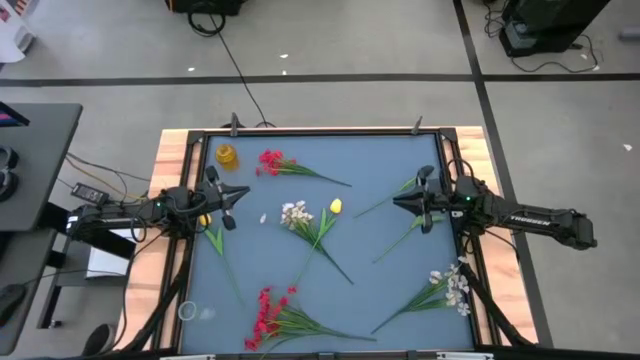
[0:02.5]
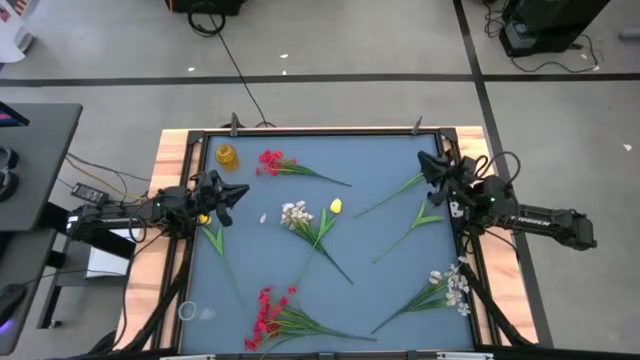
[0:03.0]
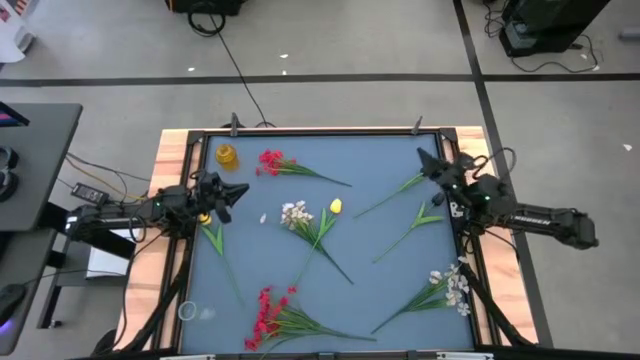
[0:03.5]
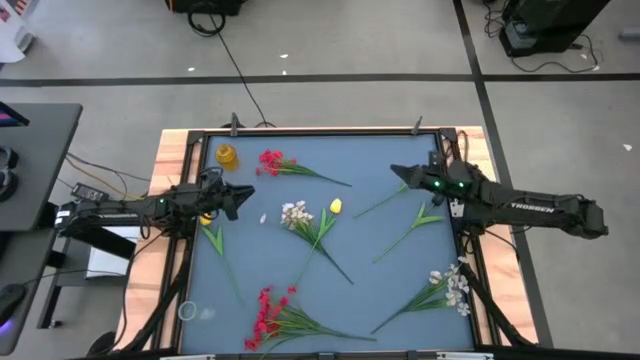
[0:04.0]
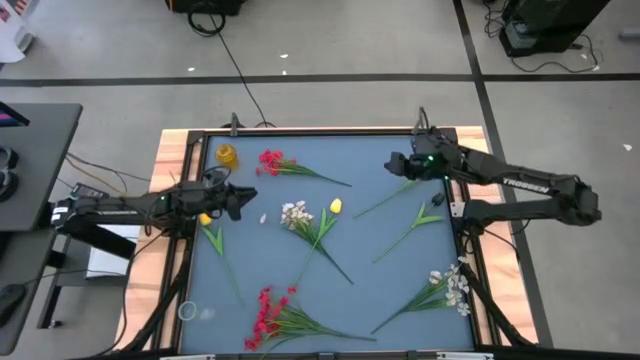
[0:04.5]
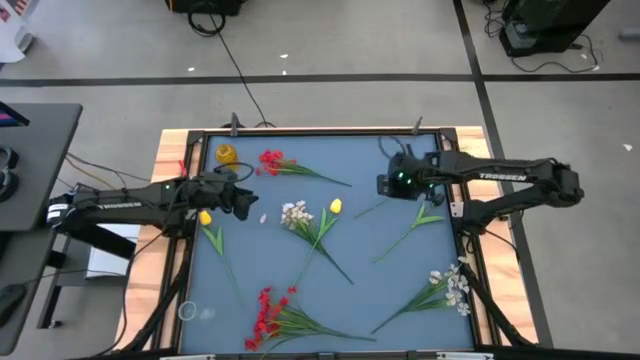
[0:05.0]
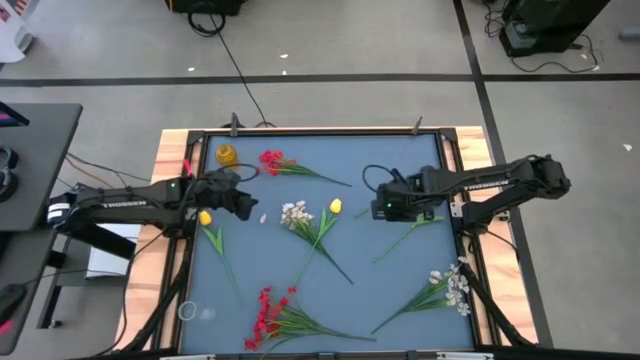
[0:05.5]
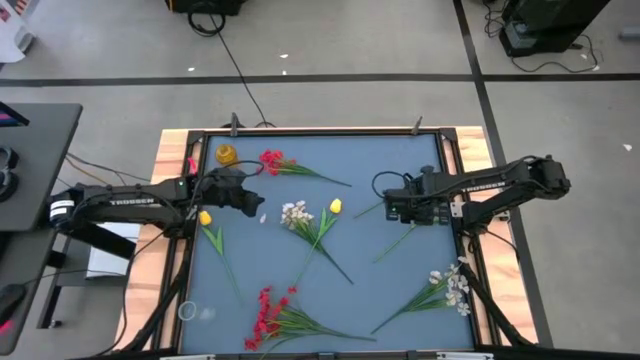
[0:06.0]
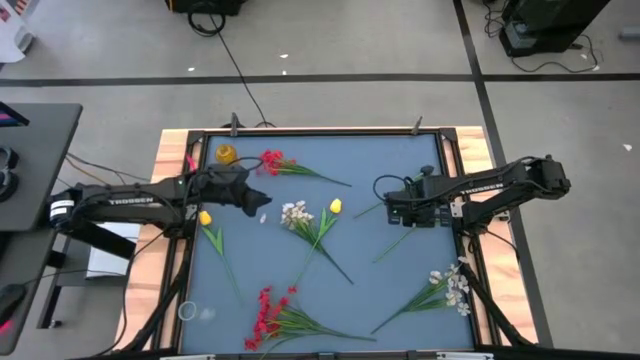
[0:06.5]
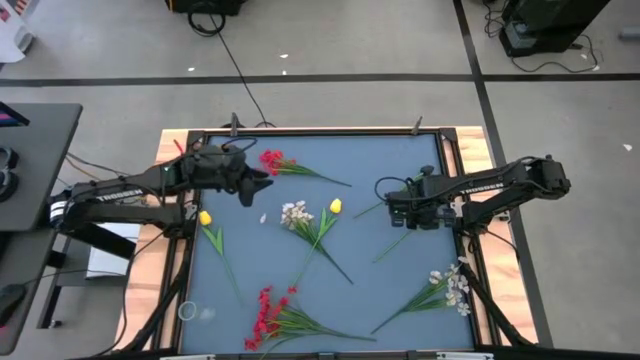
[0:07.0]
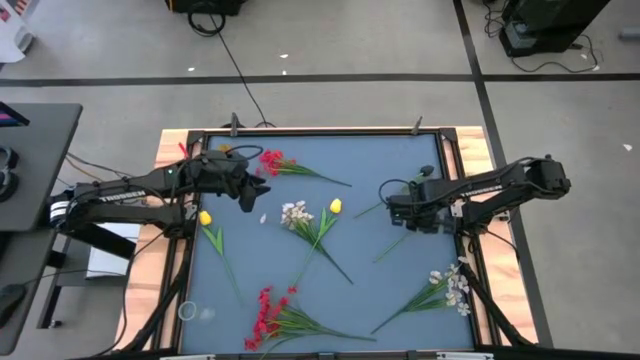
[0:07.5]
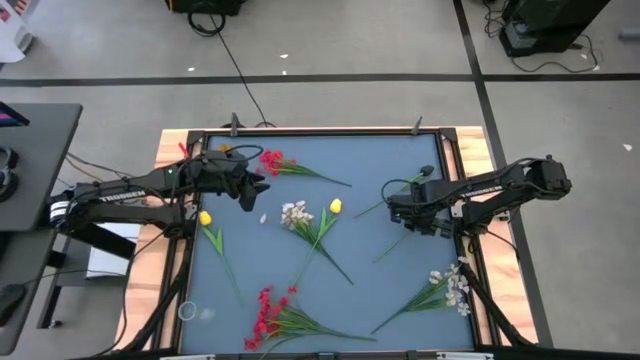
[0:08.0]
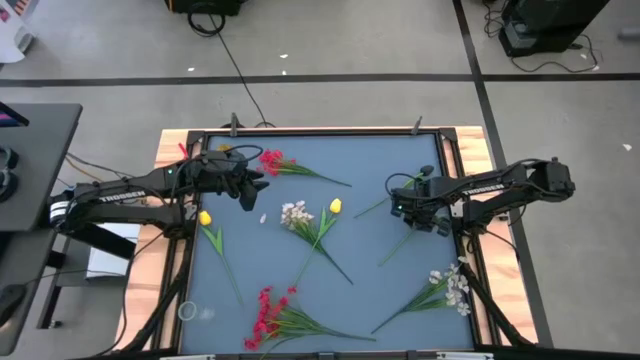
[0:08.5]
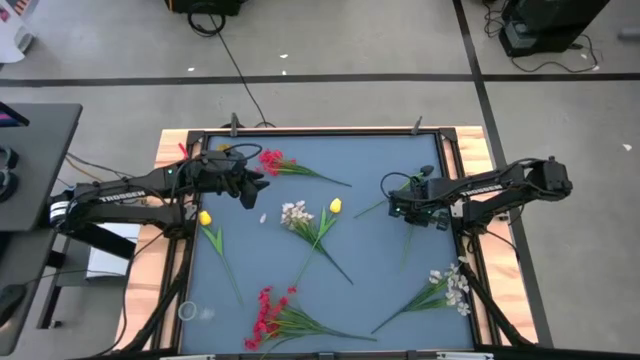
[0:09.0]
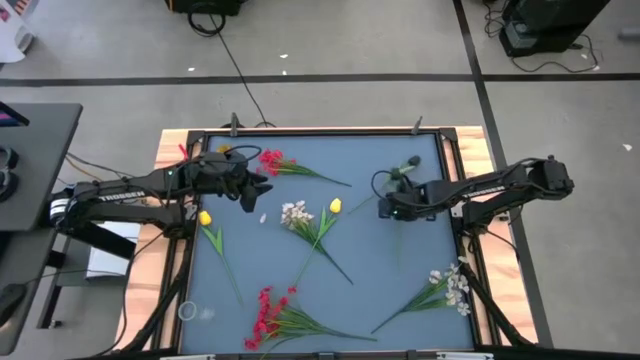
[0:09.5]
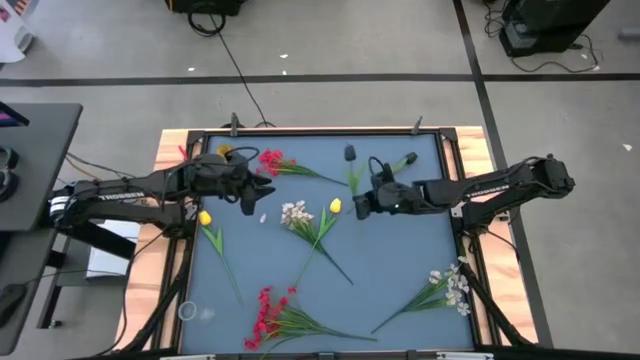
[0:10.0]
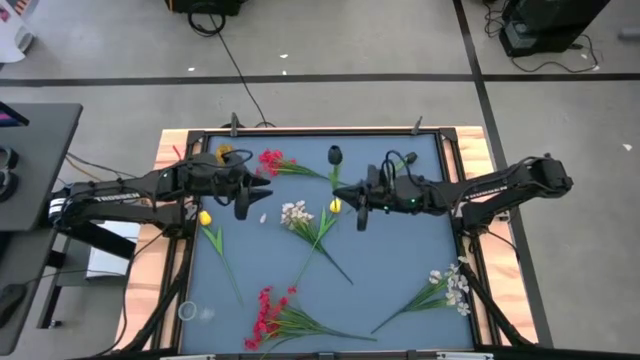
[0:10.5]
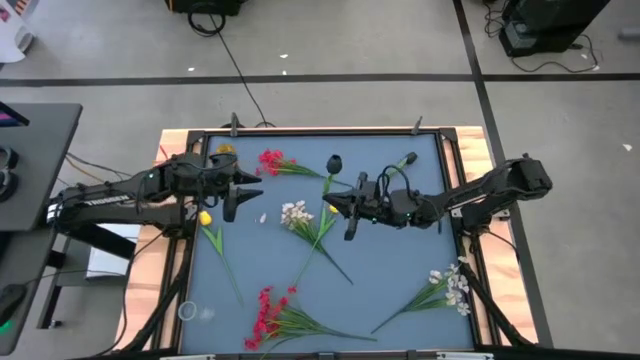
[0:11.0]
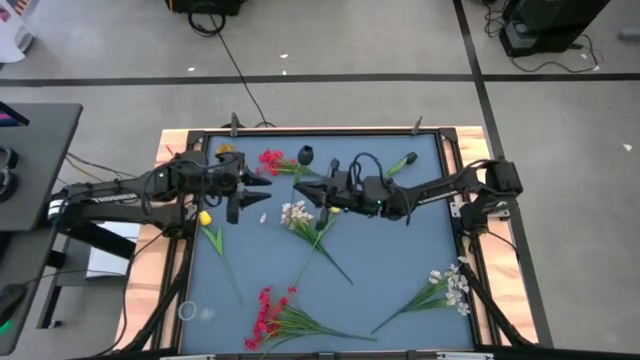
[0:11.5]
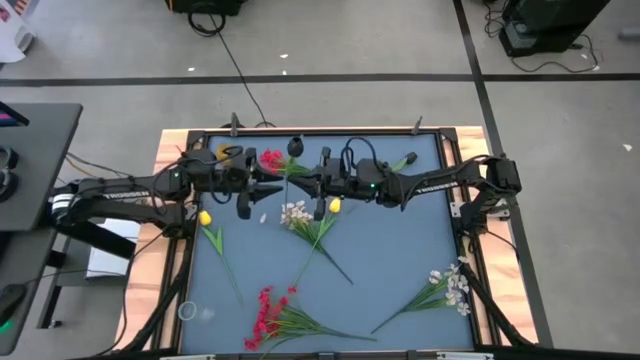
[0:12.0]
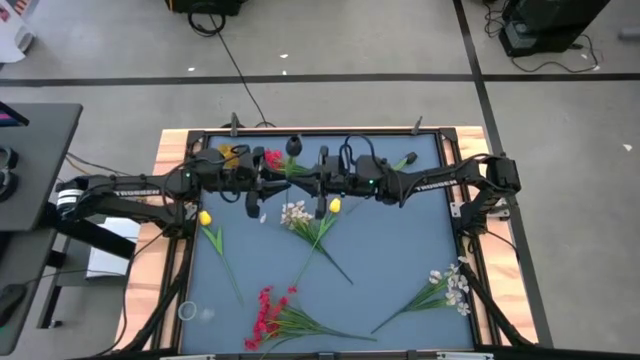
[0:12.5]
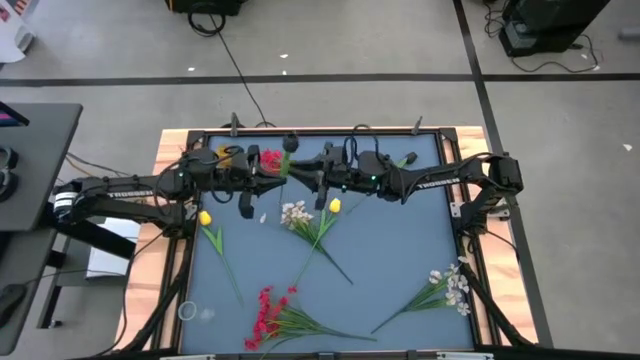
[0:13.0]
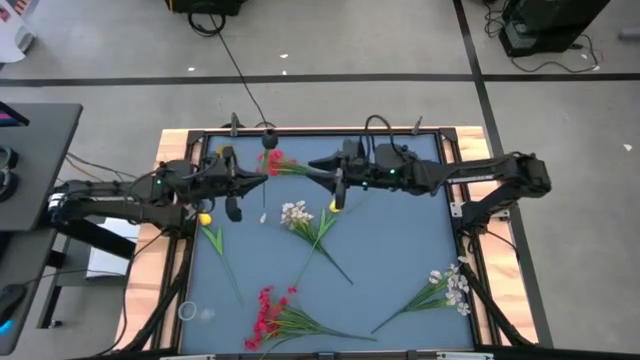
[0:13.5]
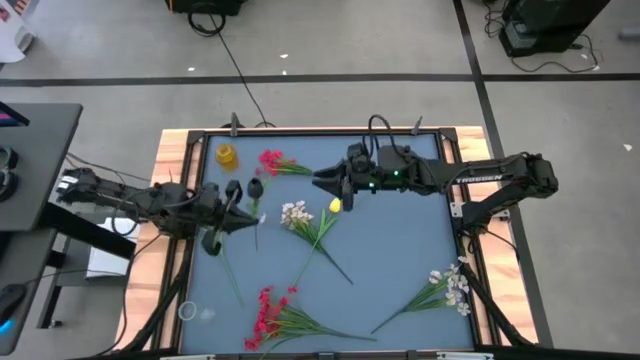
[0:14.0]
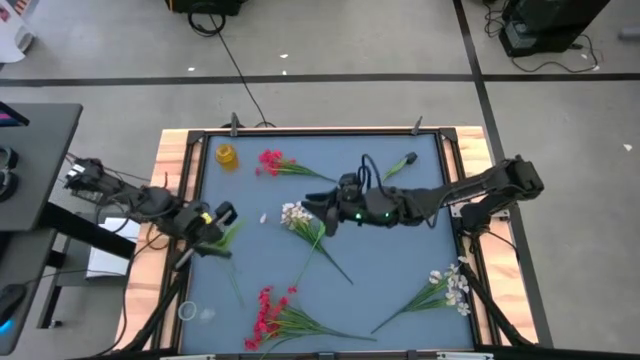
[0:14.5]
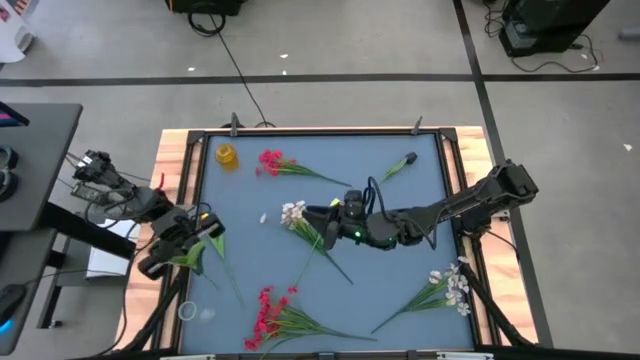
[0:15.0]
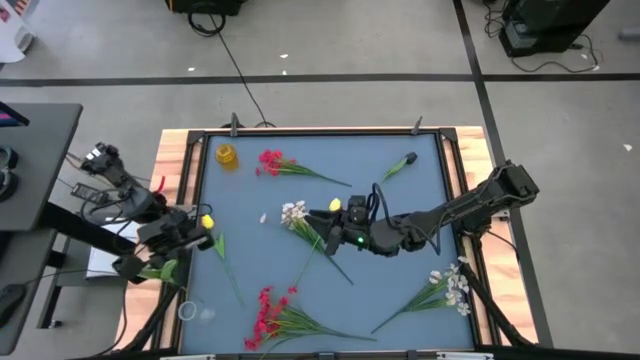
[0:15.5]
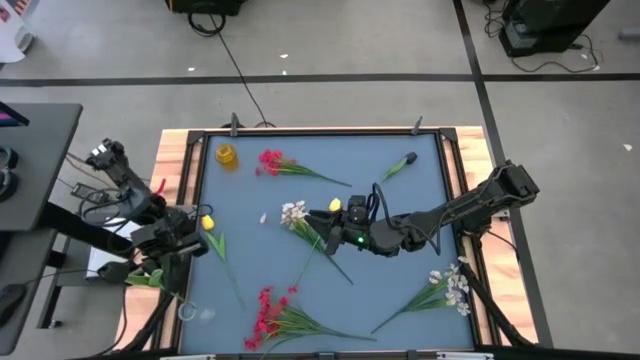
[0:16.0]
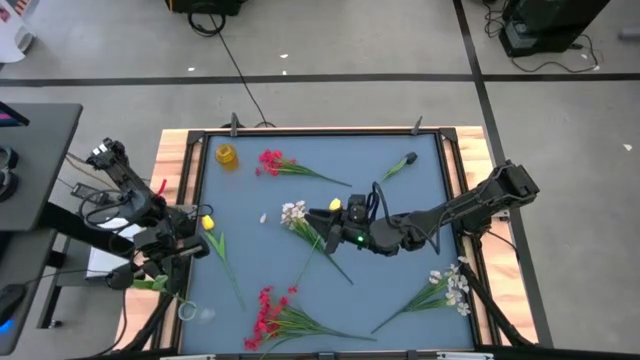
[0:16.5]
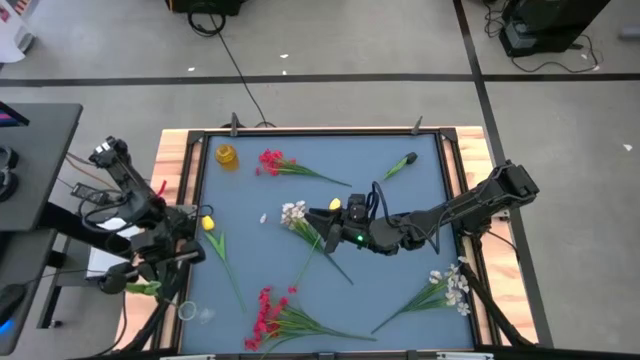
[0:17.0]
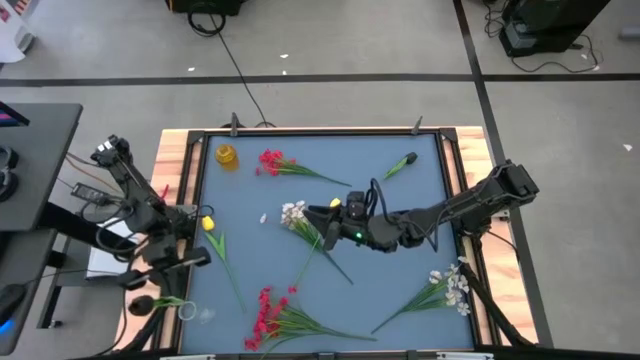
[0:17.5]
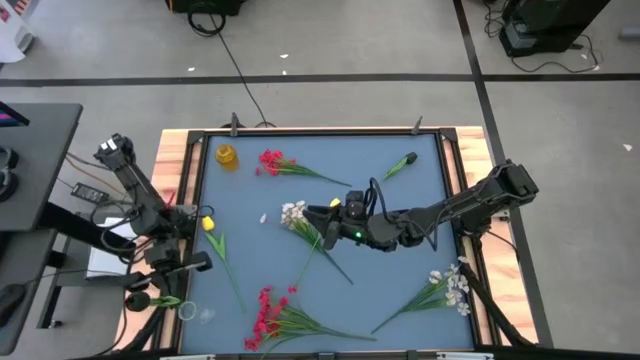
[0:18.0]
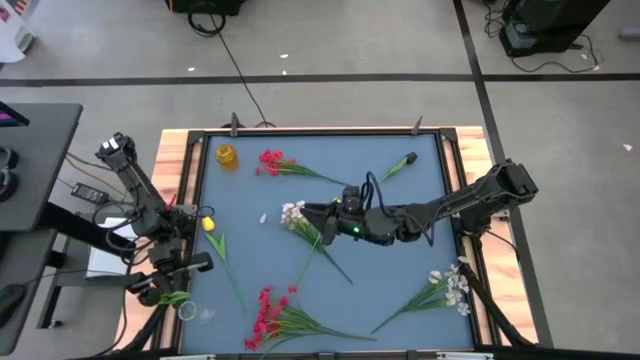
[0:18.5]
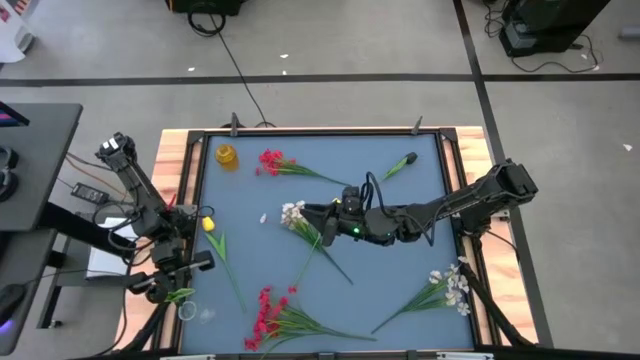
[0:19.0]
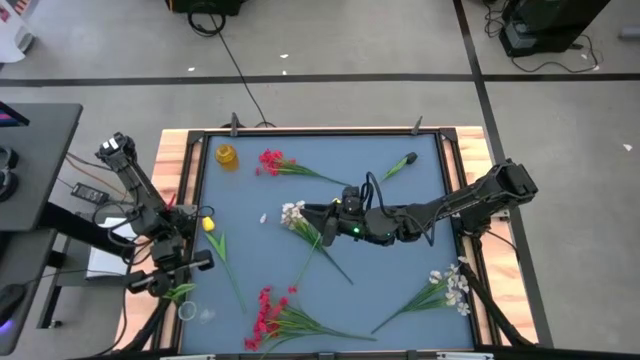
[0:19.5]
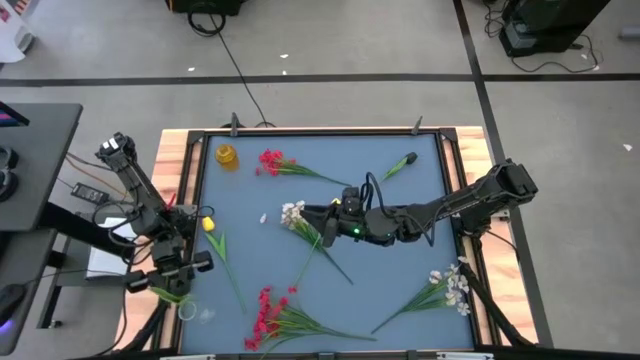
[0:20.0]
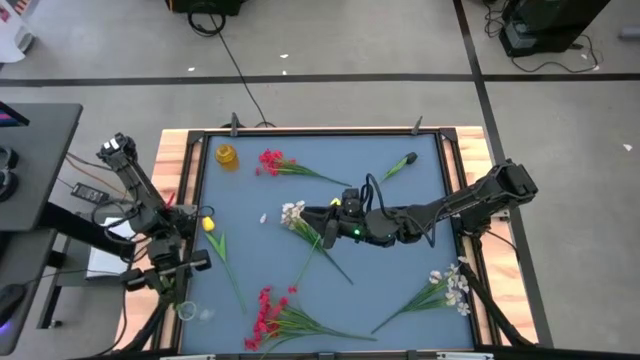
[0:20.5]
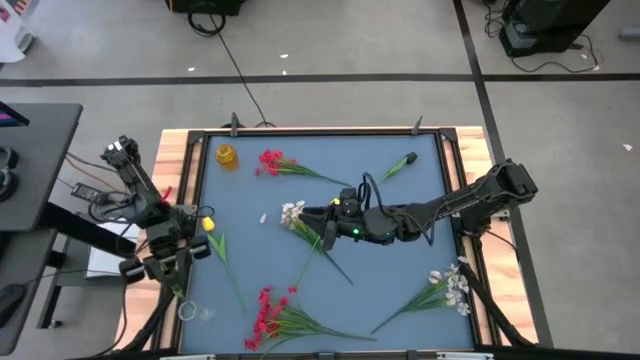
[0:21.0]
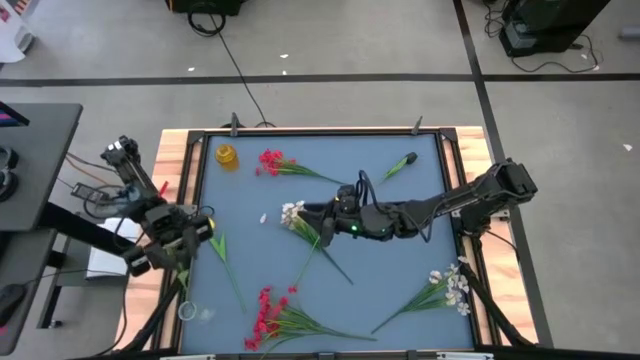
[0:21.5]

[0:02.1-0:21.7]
Task: Sort flowers into vase by color
Put the bottom black tulip into the transparent vase
